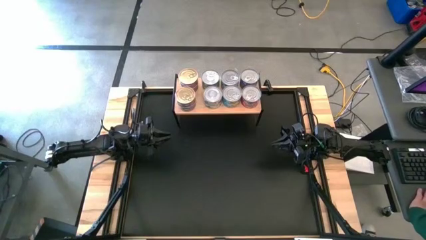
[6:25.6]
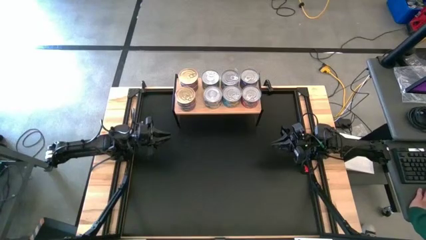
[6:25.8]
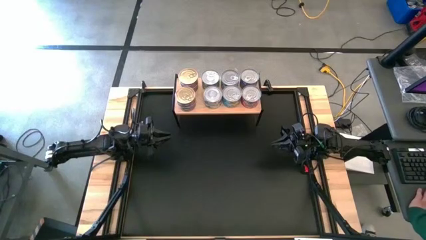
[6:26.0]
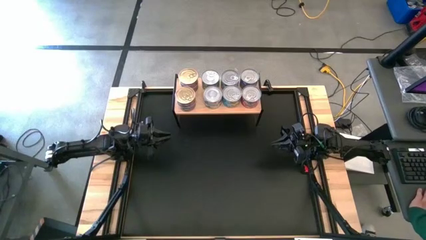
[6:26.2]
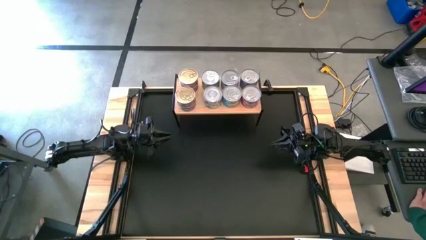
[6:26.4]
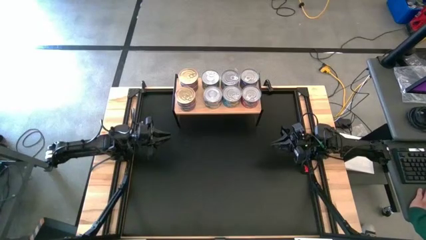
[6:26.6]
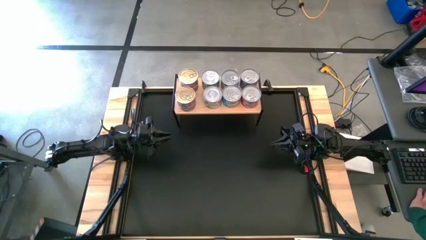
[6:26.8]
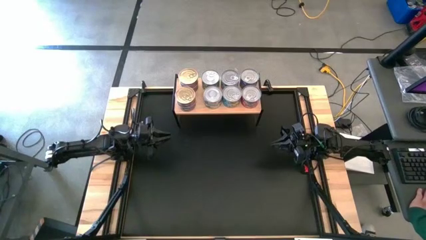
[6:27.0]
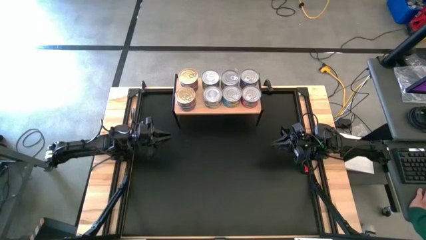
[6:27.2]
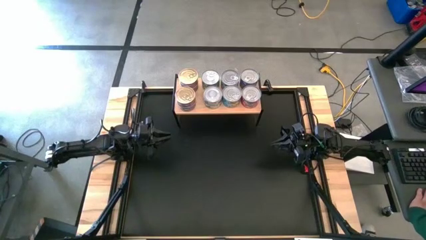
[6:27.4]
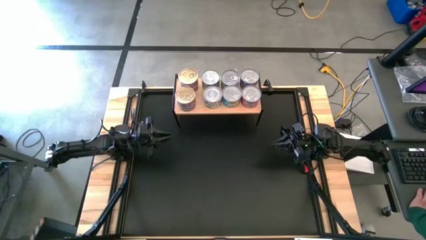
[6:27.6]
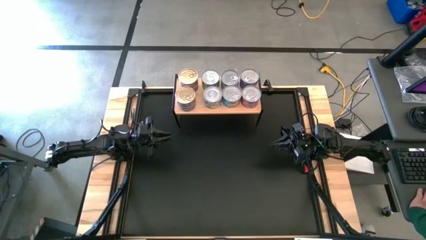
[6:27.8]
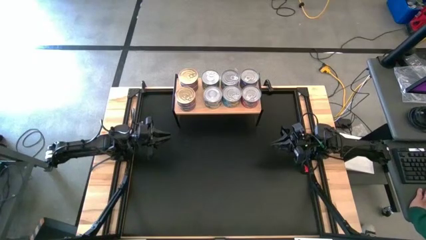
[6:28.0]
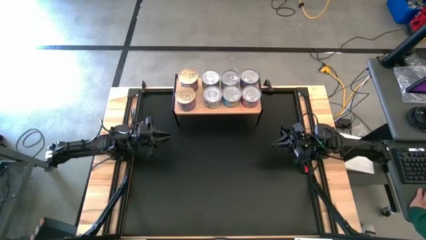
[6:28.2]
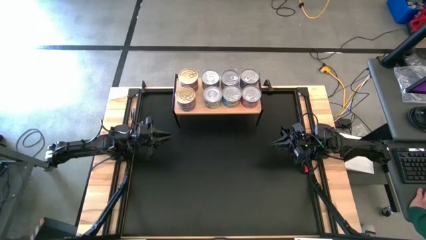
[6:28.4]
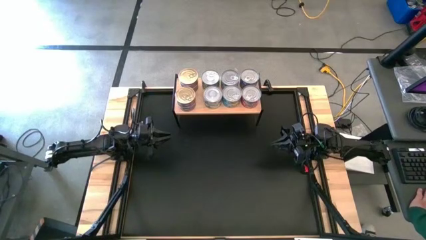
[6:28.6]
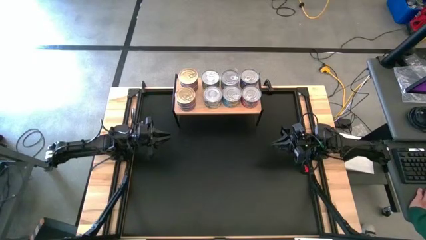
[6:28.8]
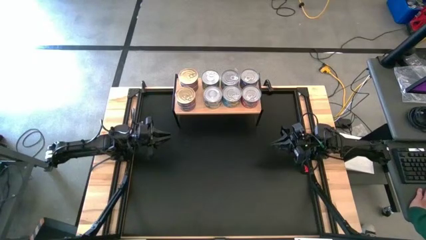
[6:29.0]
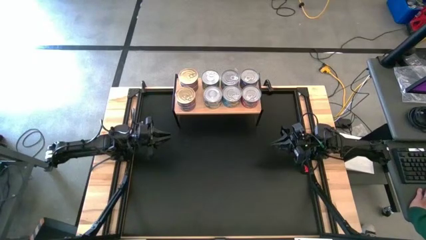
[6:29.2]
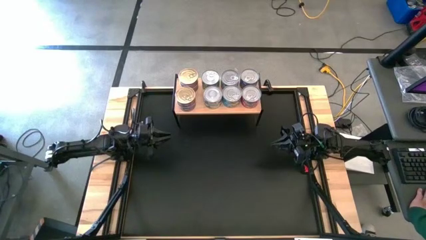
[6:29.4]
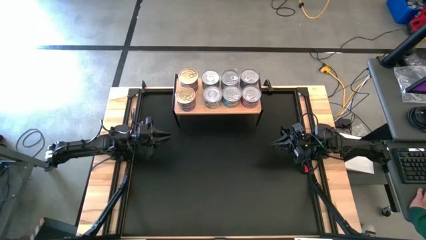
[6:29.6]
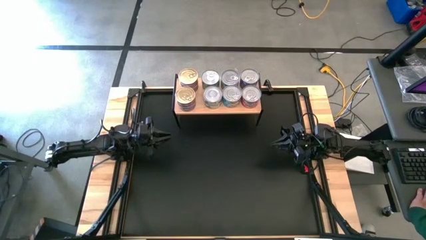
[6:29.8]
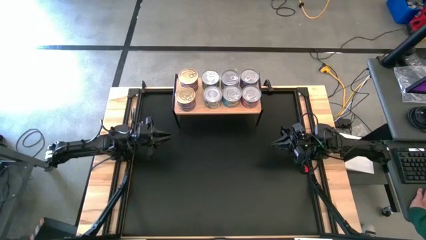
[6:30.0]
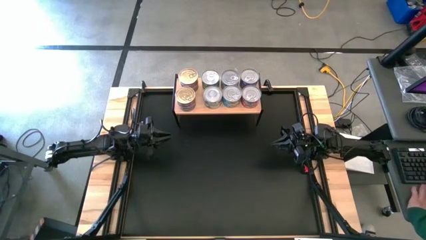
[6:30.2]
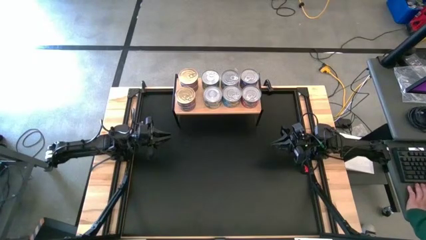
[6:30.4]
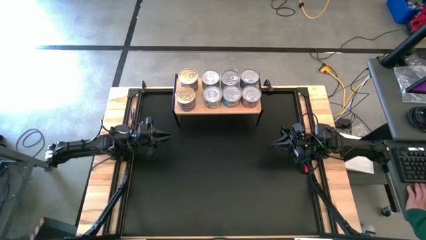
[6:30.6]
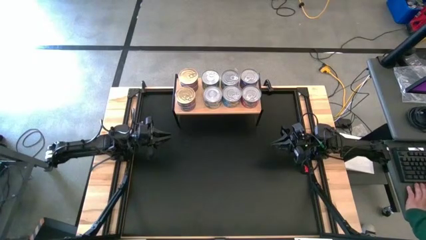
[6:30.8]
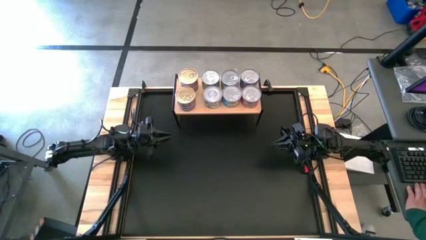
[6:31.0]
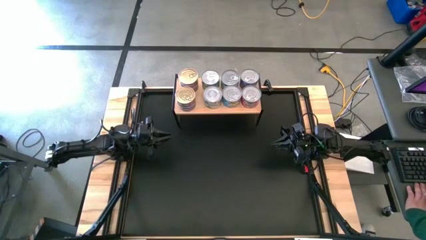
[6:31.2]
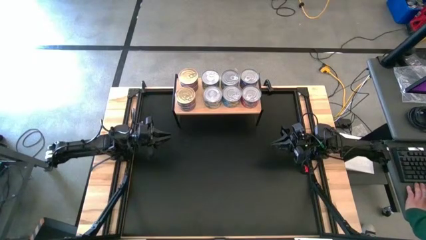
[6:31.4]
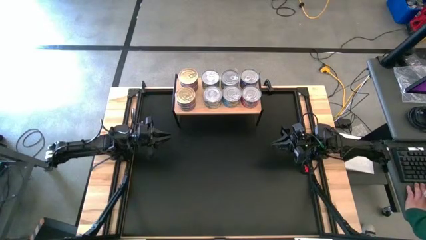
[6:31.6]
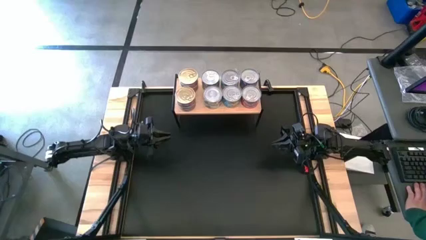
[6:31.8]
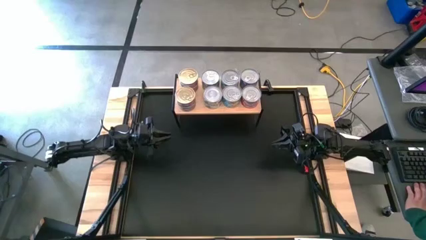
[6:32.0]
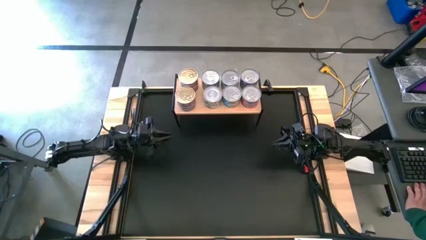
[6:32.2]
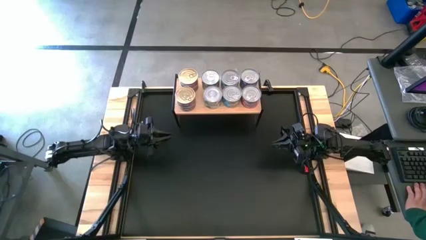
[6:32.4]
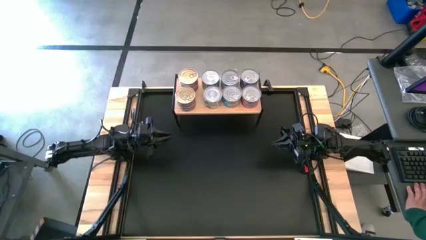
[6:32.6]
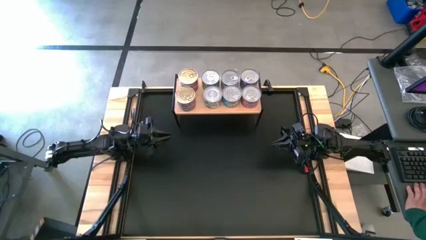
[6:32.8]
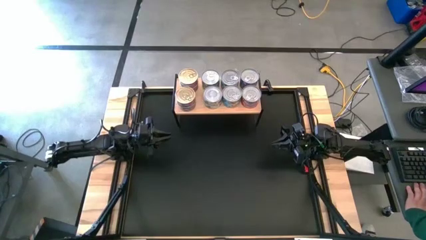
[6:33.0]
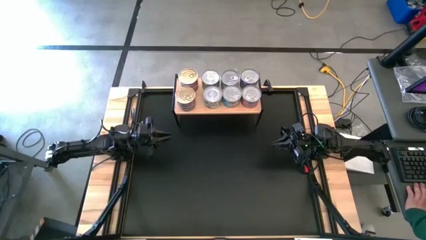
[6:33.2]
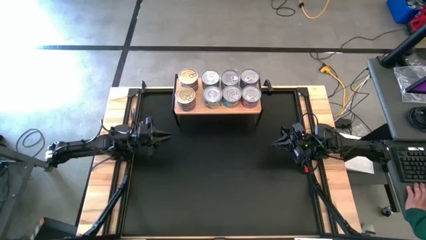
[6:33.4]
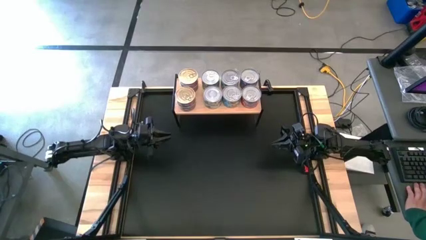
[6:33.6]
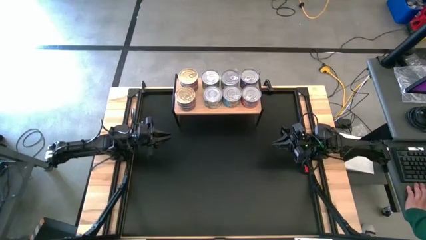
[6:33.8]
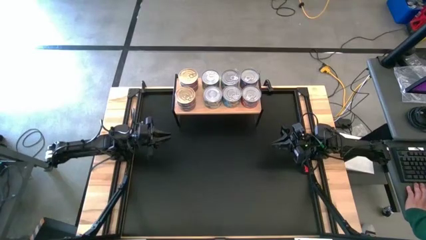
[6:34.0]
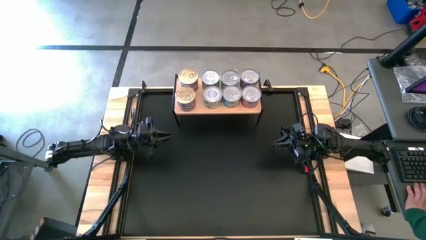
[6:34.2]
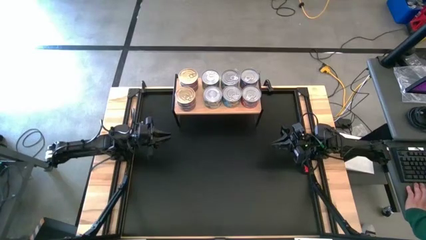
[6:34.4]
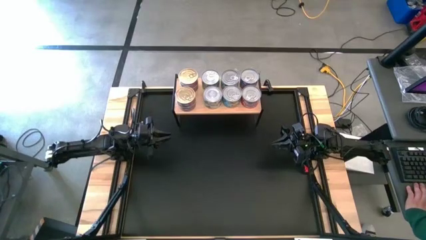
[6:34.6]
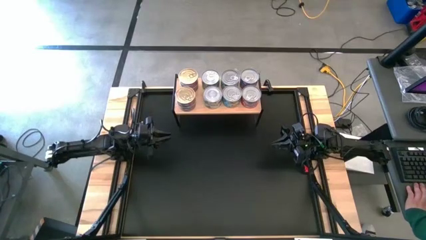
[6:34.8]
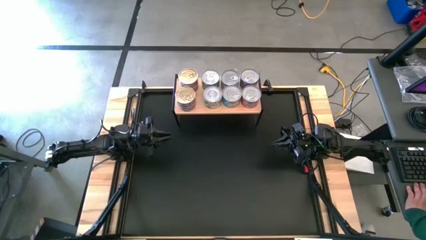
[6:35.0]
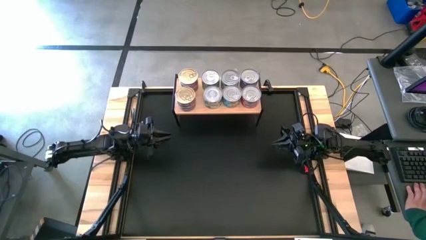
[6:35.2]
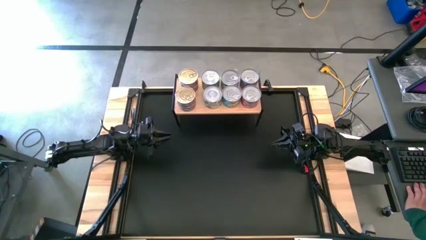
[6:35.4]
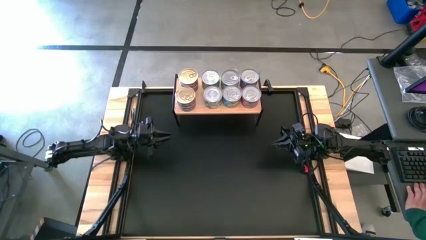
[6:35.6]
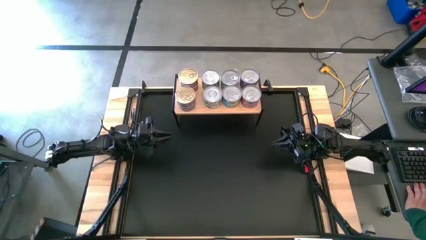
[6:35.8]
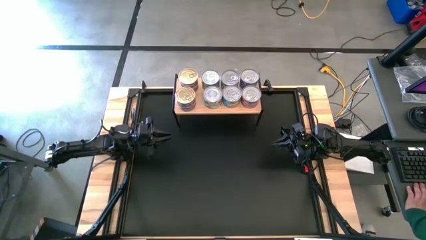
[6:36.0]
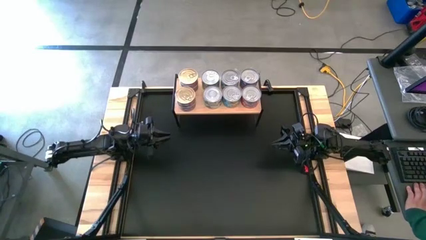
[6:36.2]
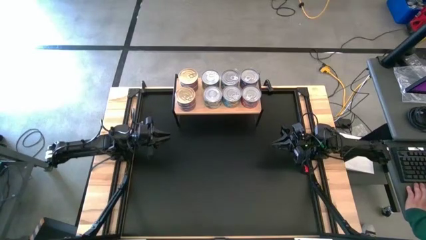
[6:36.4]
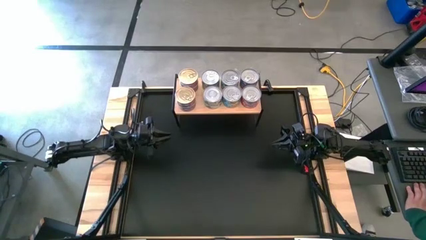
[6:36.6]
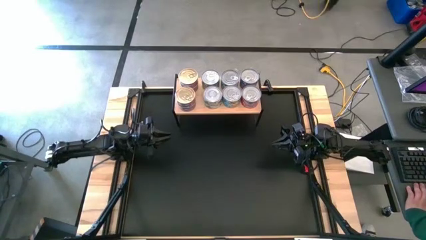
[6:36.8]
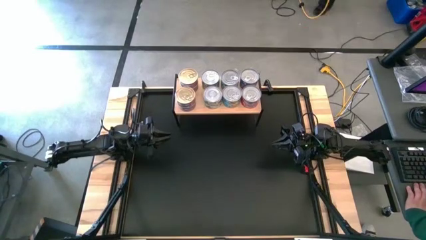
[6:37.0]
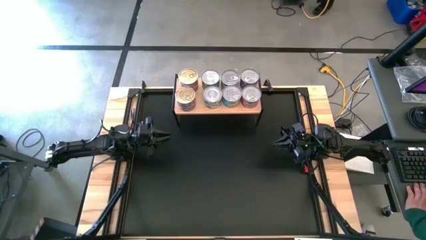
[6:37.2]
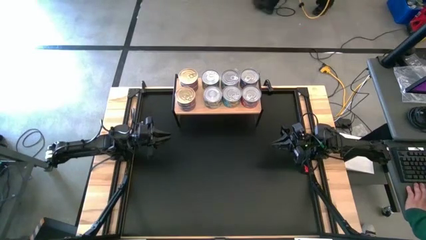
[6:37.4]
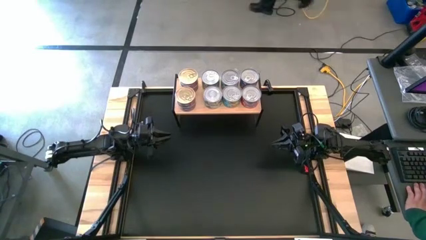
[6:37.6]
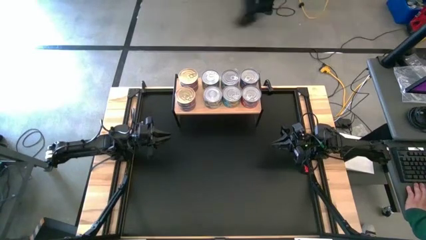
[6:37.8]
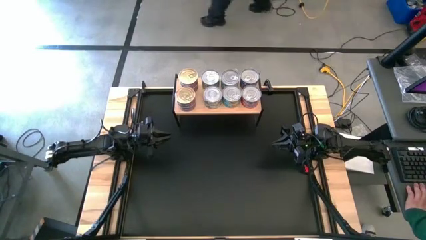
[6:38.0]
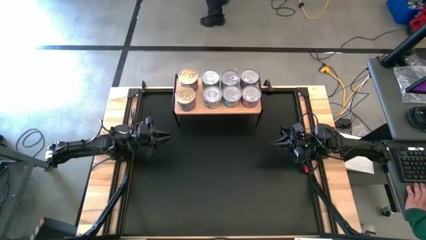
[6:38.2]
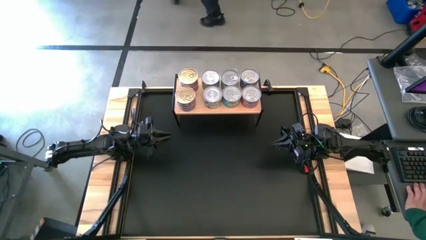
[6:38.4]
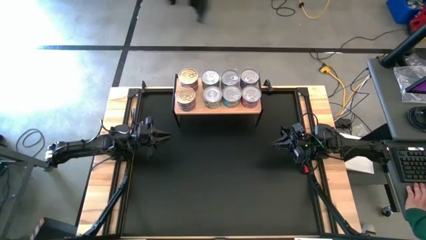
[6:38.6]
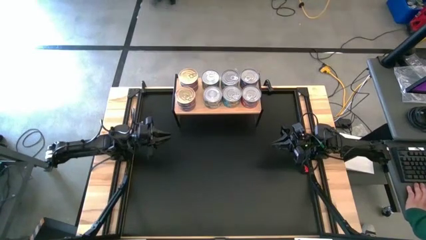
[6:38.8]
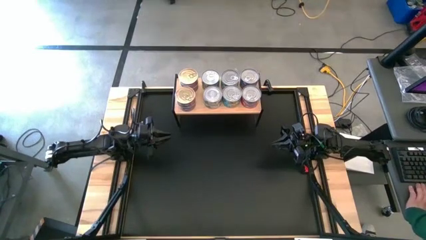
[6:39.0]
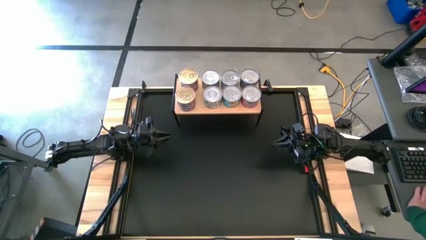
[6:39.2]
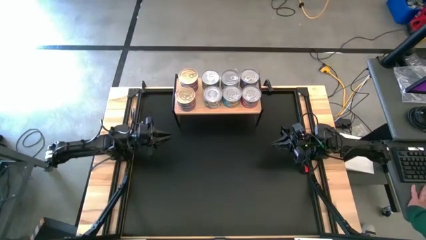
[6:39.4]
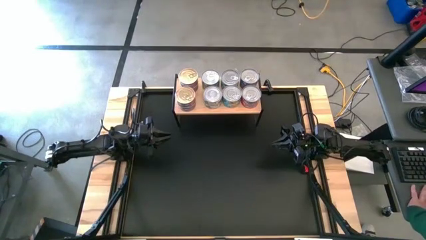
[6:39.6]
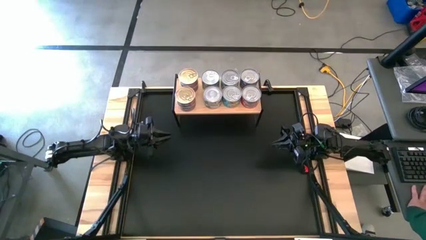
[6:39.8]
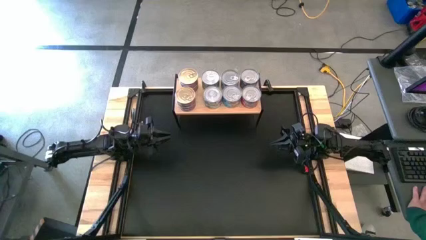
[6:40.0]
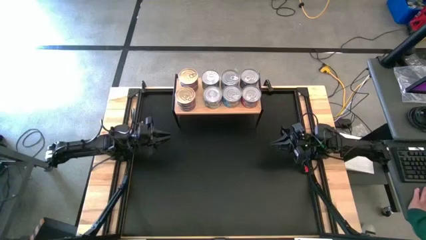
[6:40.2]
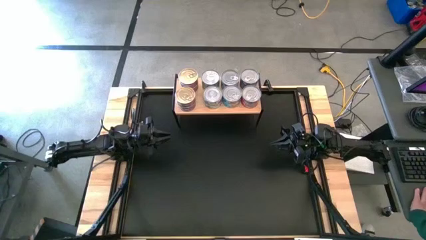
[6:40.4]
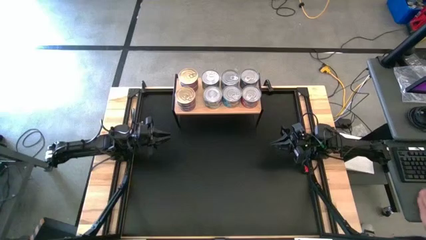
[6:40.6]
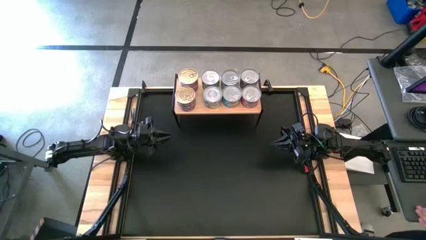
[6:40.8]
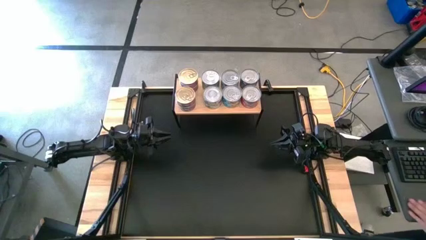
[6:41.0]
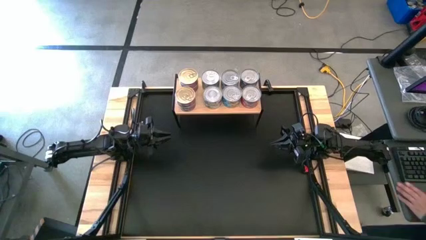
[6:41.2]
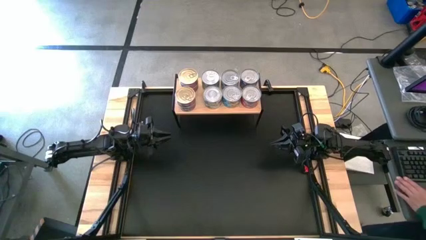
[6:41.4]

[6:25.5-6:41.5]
Task: Stack canned seafood by type on shelf
Return to Home Position
